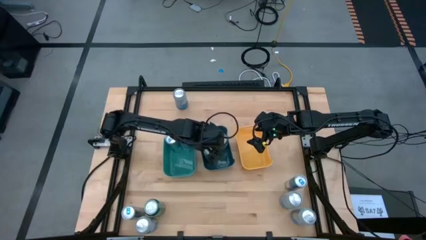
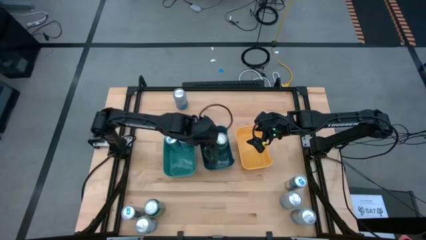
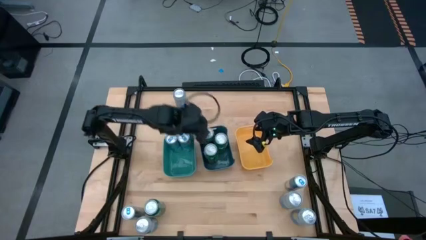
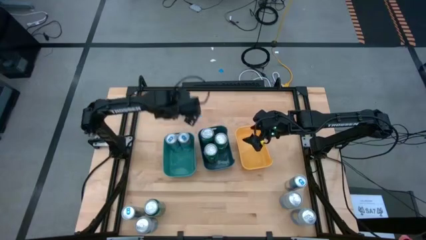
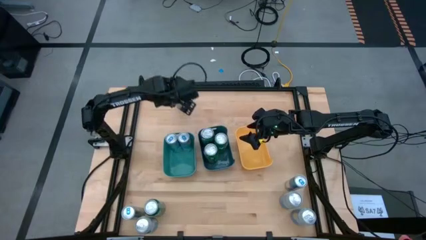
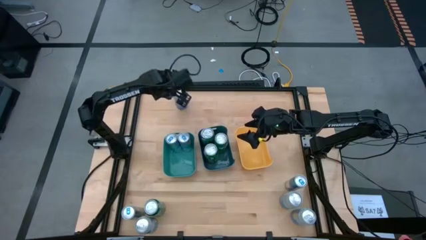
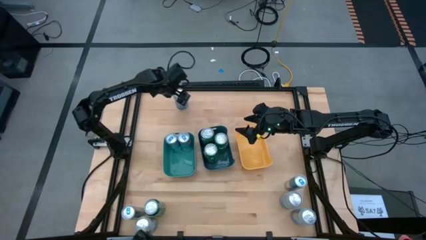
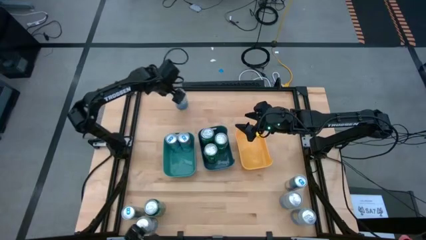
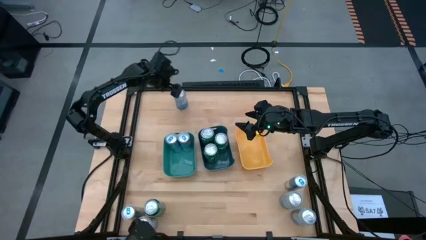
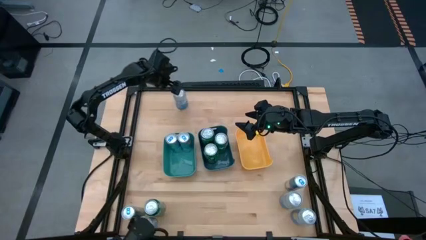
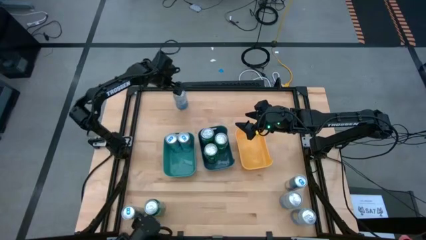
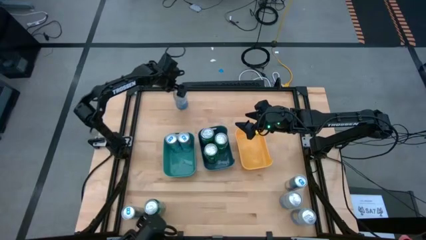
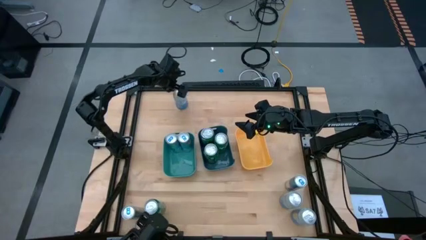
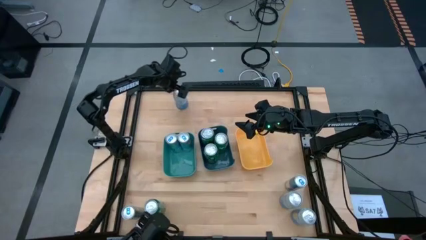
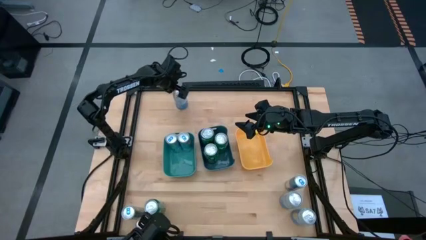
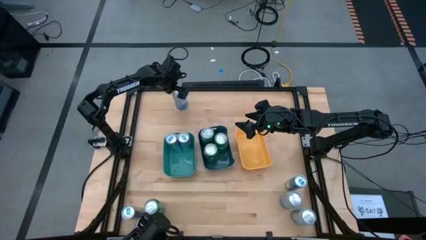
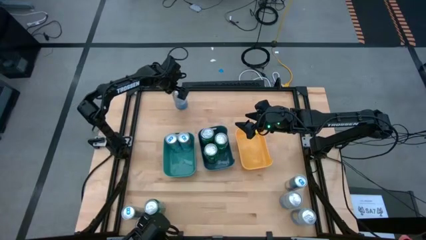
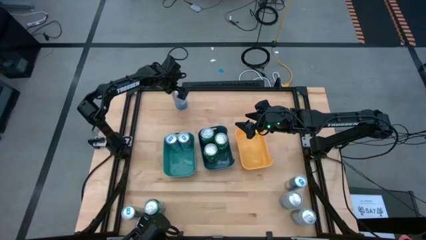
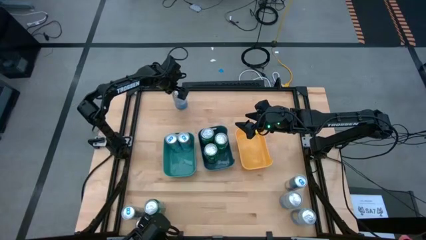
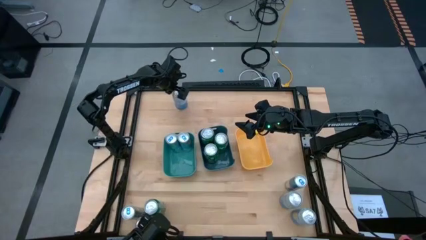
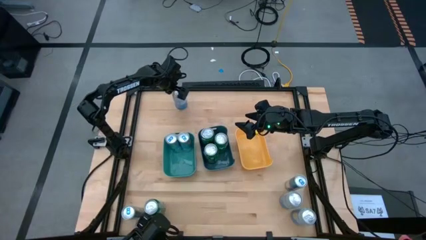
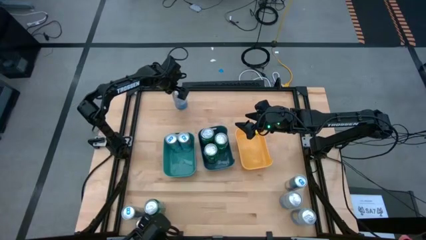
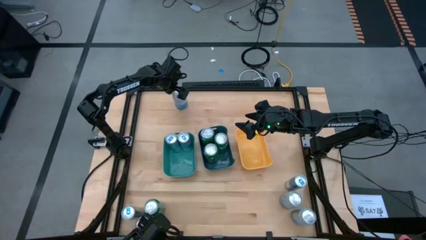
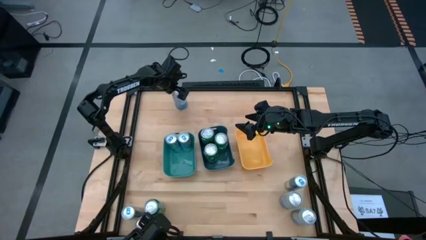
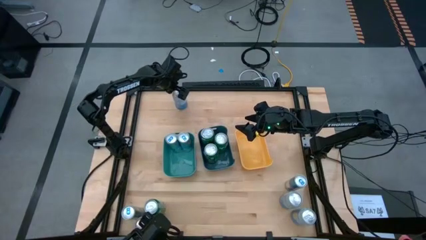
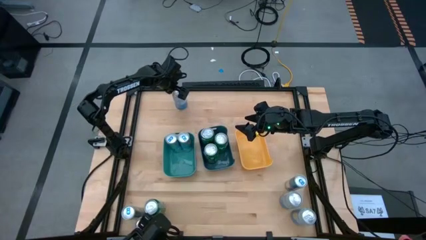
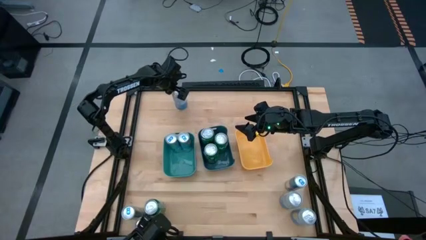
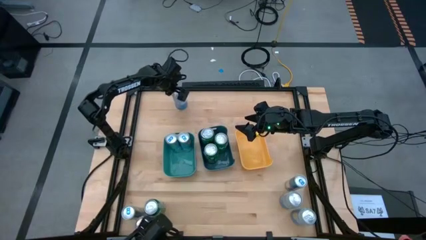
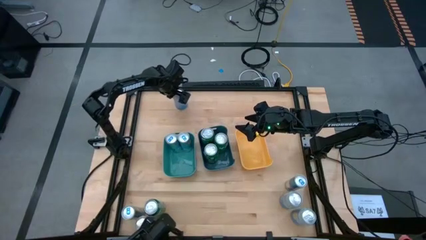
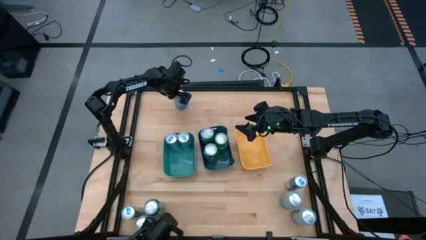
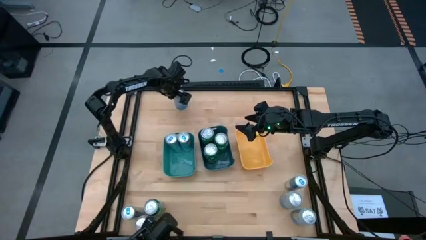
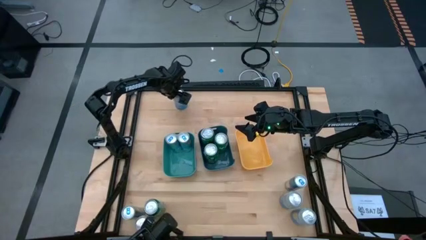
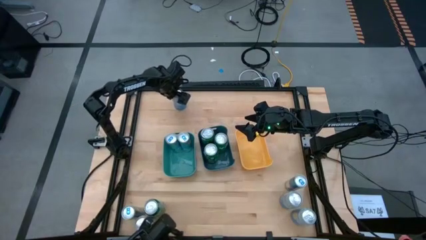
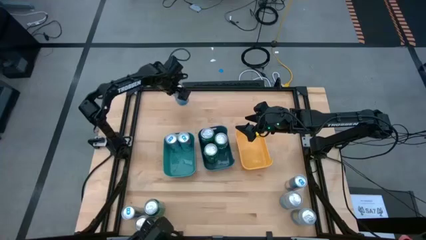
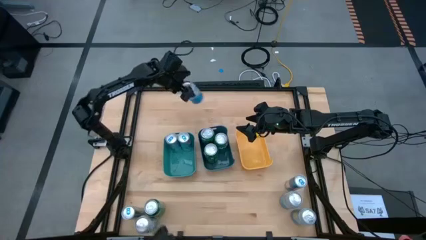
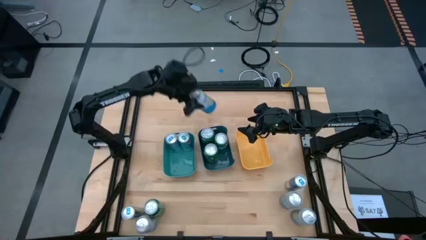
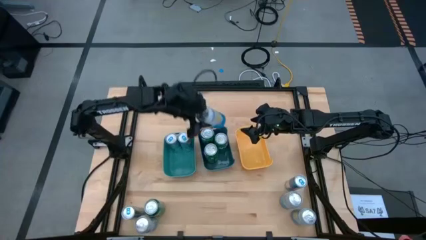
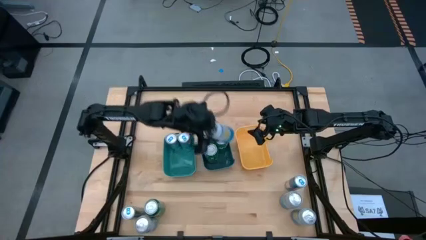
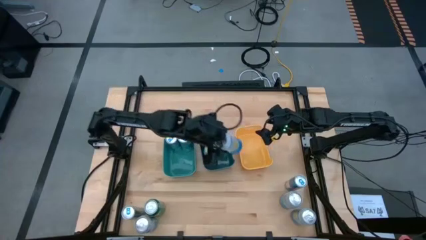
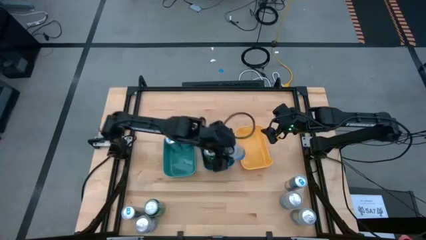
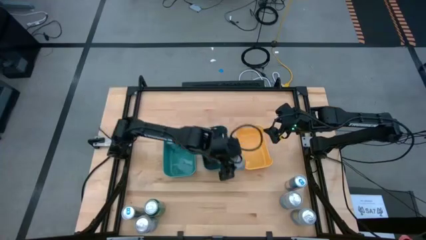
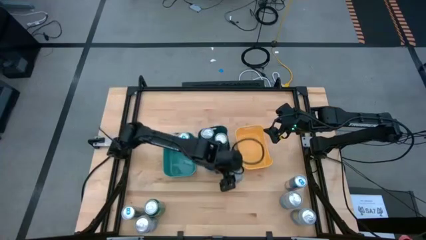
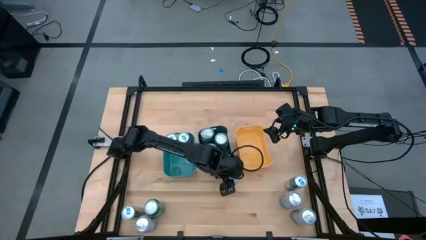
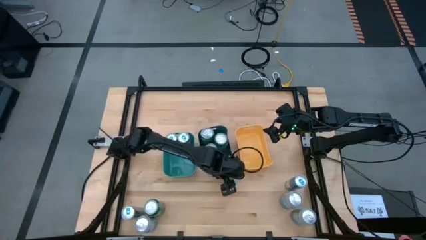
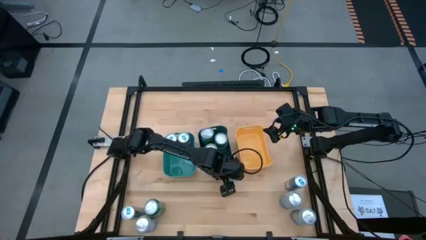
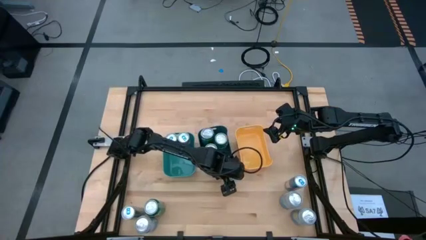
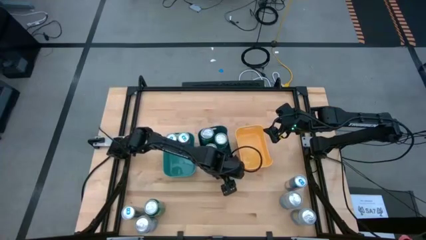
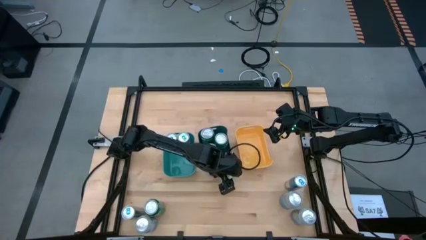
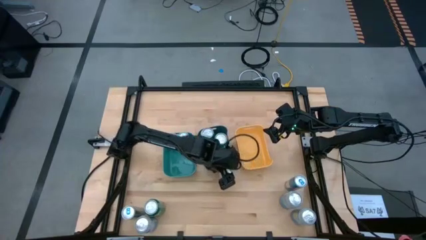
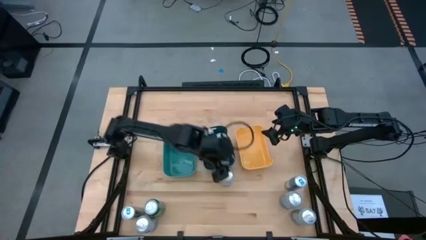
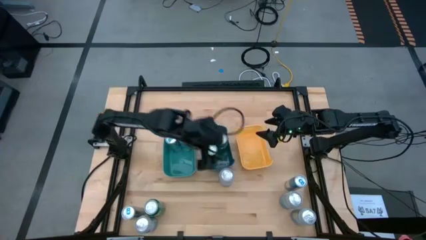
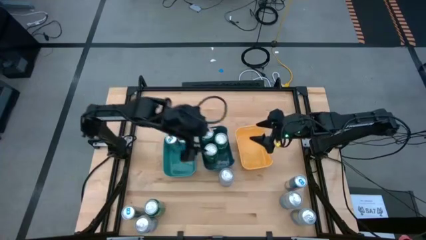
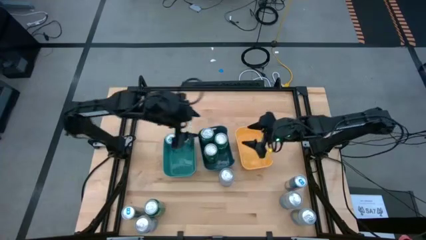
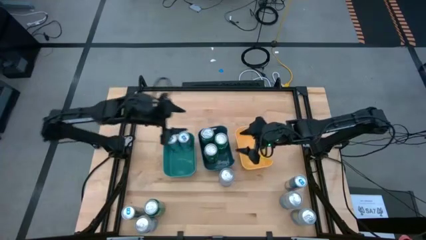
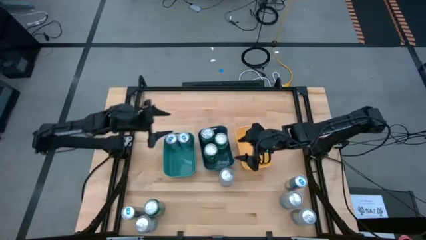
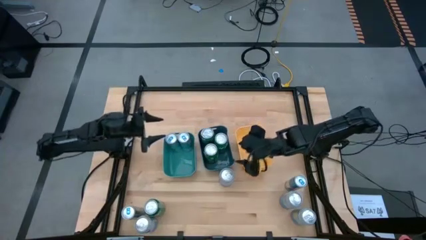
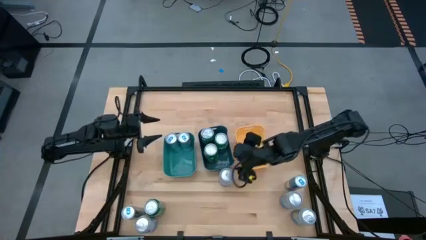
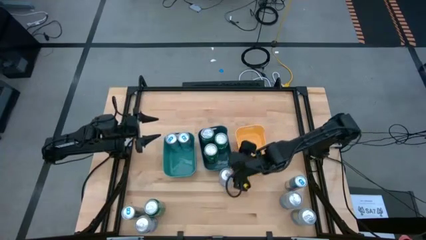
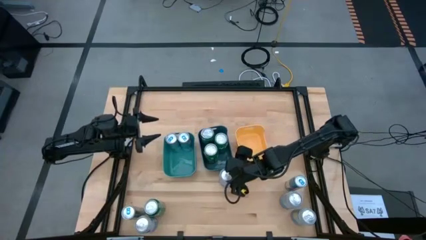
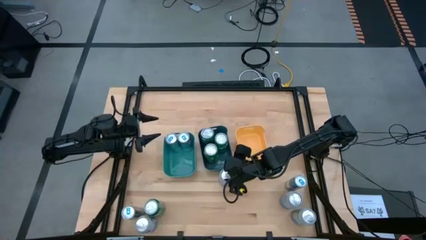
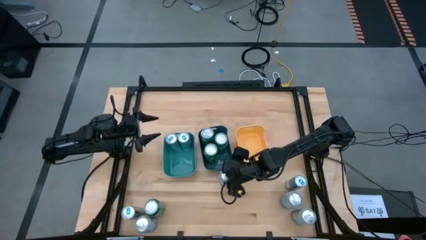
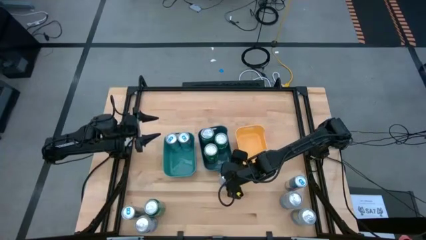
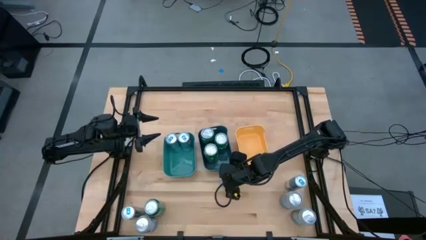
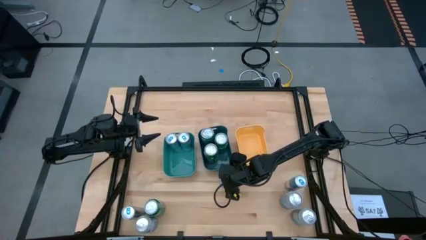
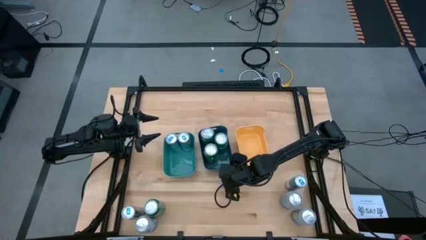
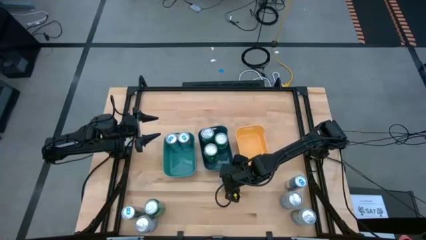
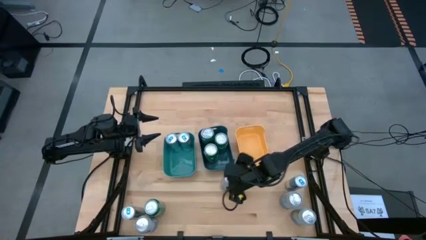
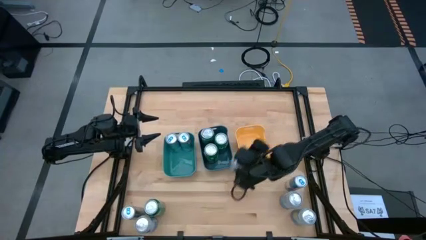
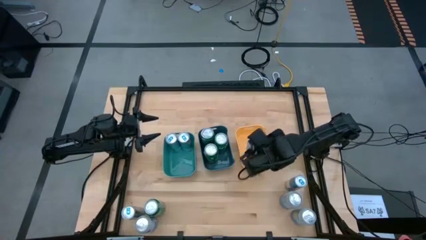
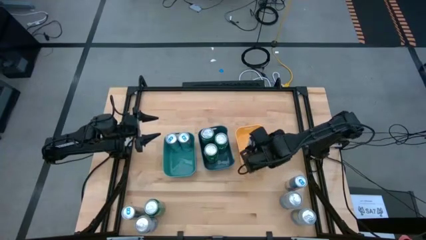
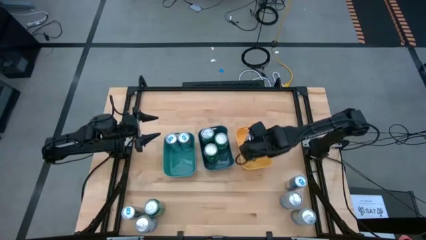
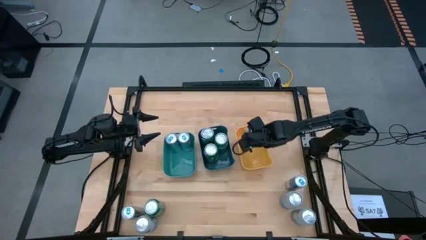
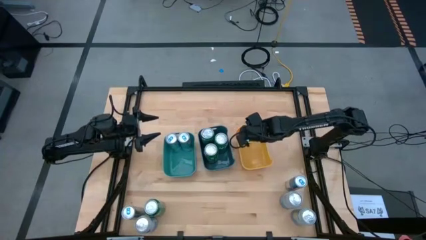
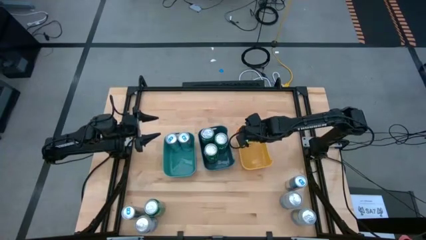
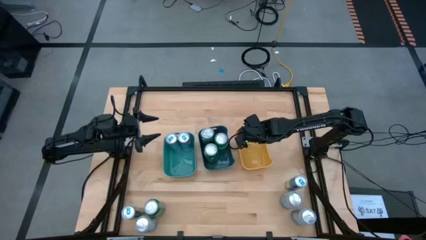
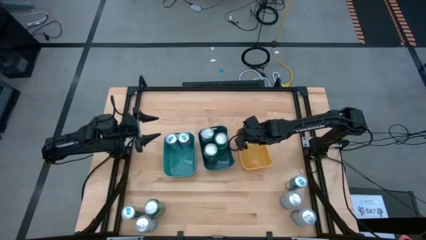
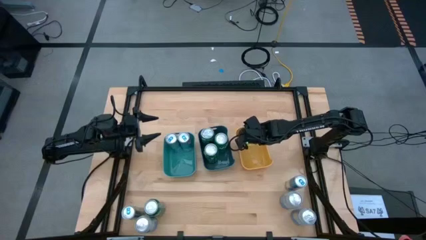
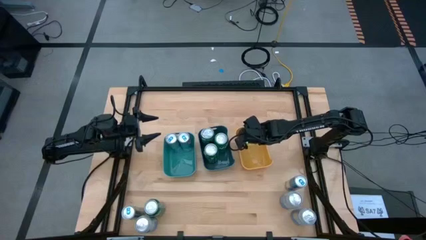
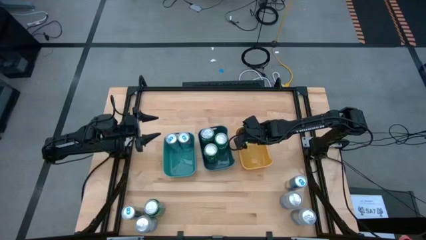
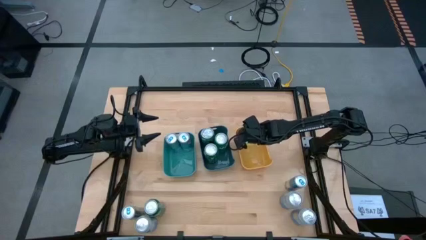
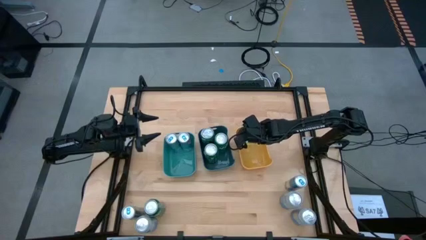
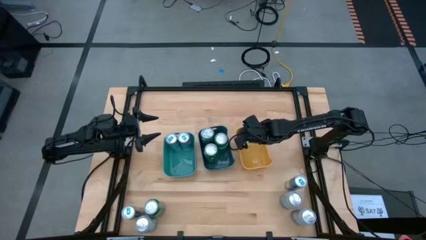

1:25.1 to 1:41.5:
Task: Sort soda cans
Put the top blue/white soda can into the yellow bin
